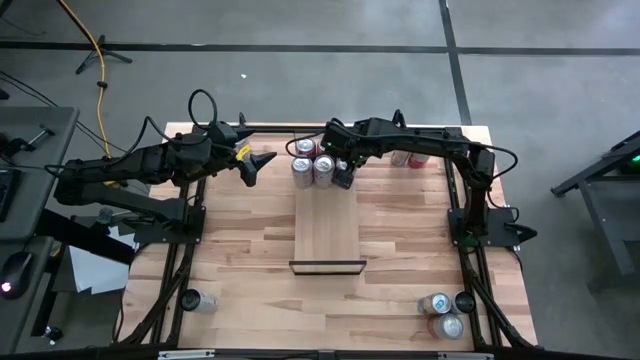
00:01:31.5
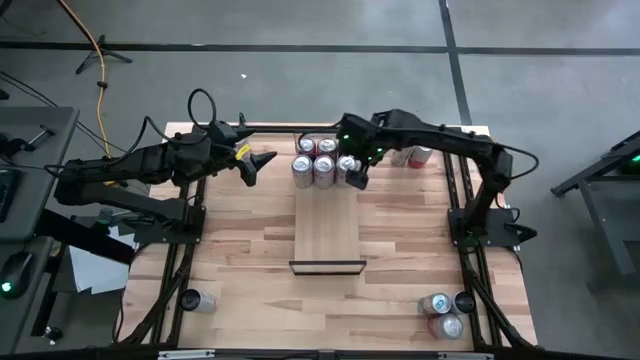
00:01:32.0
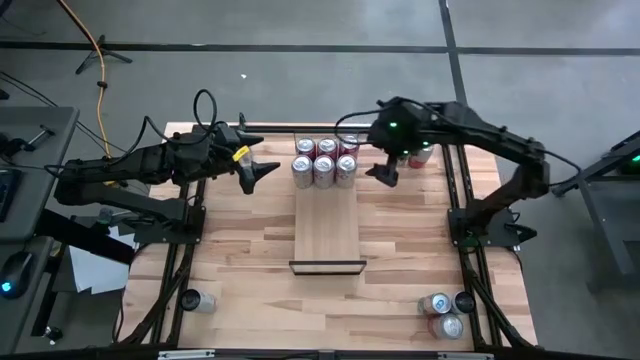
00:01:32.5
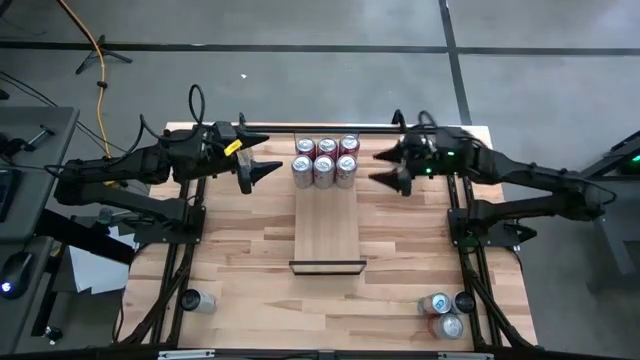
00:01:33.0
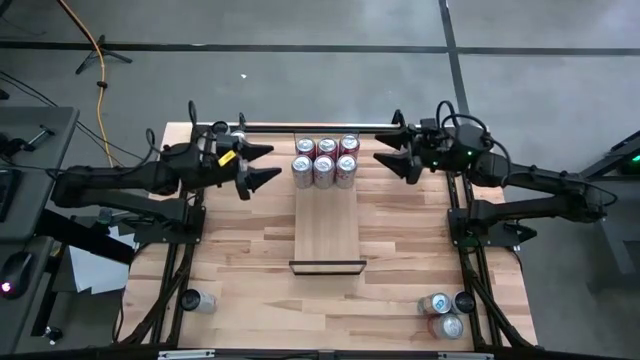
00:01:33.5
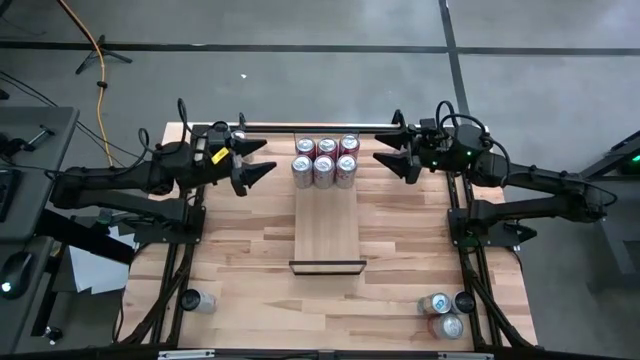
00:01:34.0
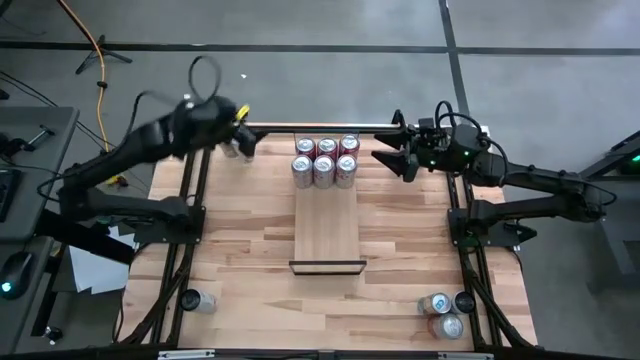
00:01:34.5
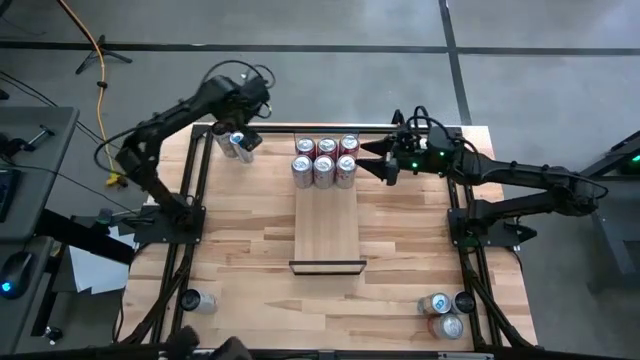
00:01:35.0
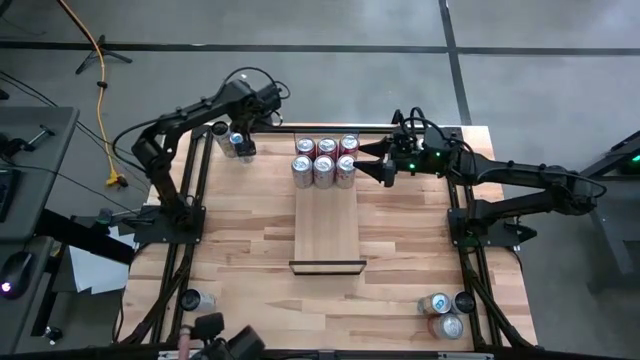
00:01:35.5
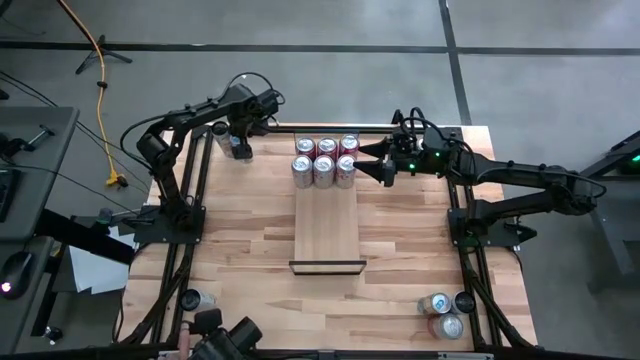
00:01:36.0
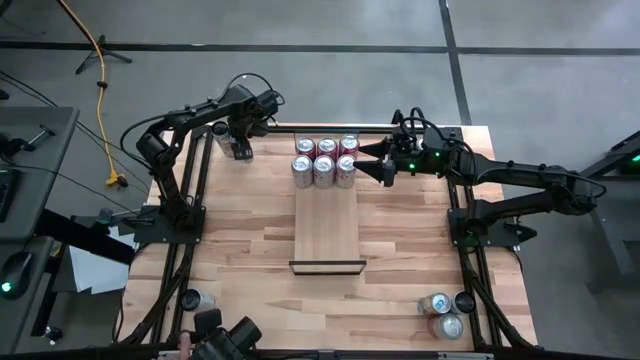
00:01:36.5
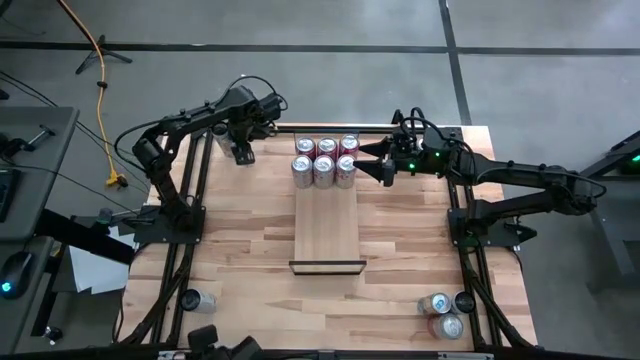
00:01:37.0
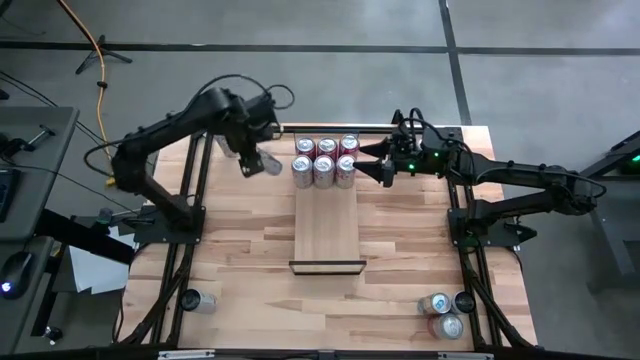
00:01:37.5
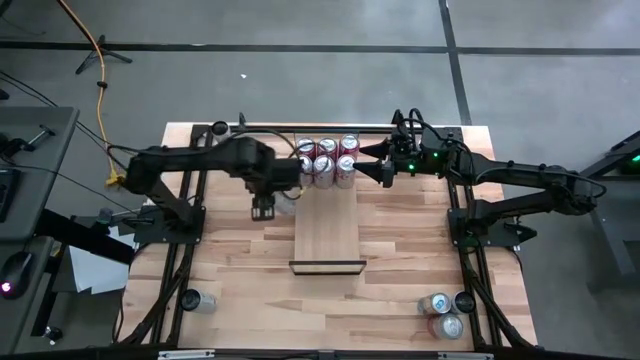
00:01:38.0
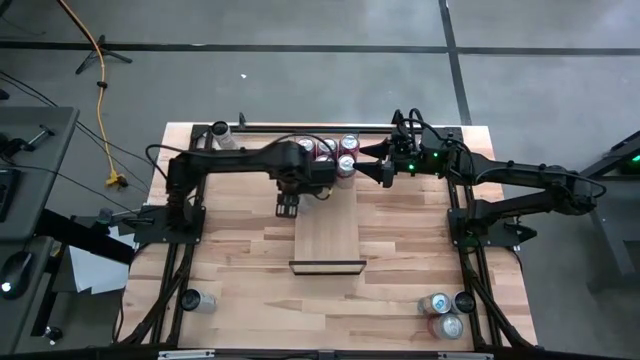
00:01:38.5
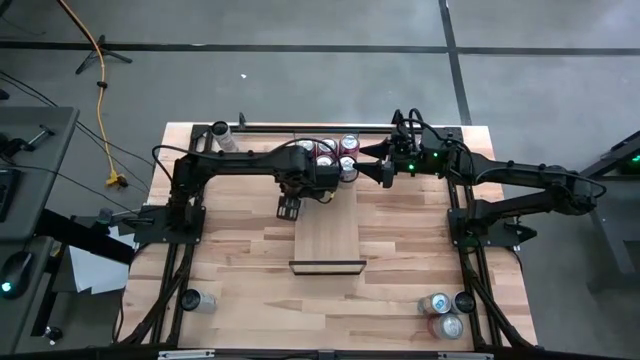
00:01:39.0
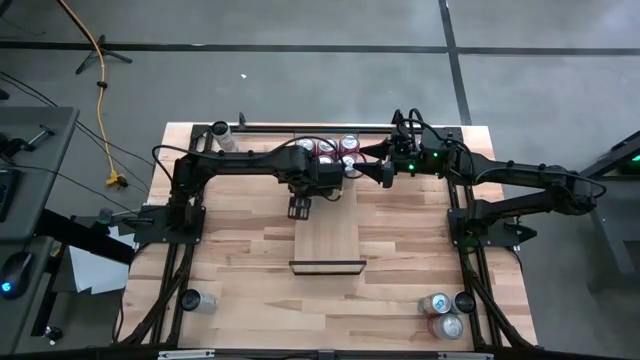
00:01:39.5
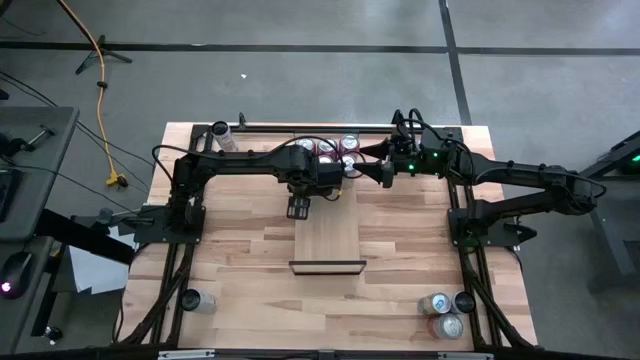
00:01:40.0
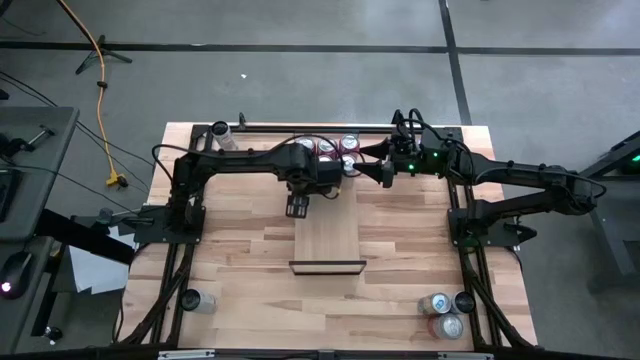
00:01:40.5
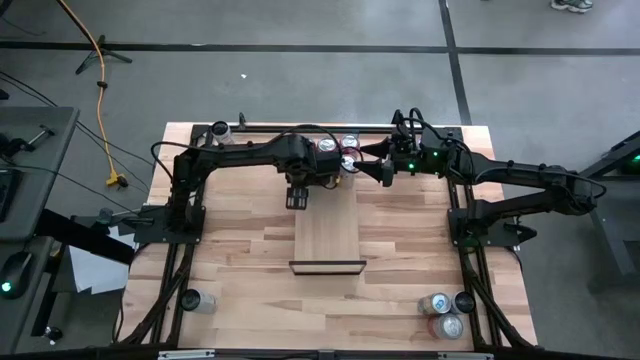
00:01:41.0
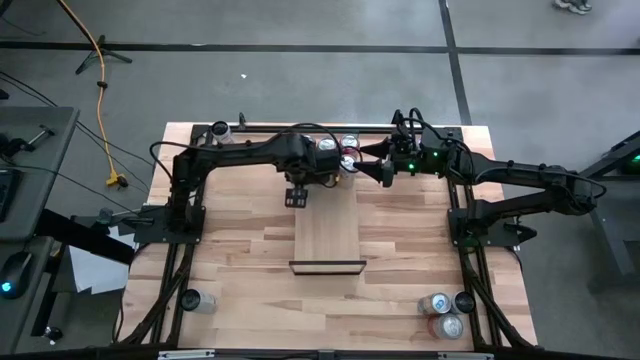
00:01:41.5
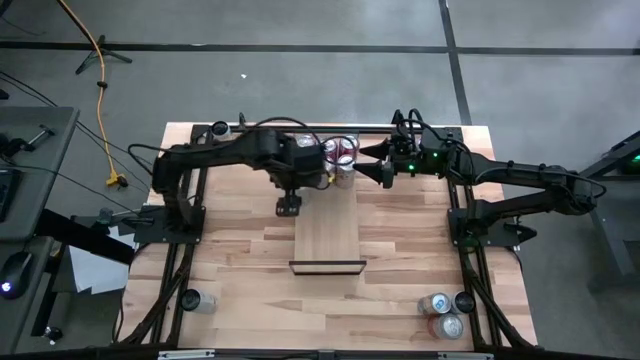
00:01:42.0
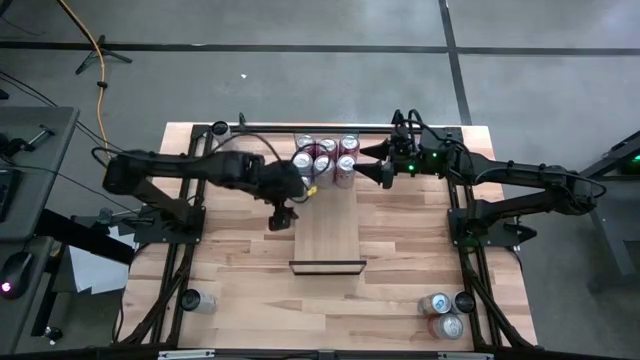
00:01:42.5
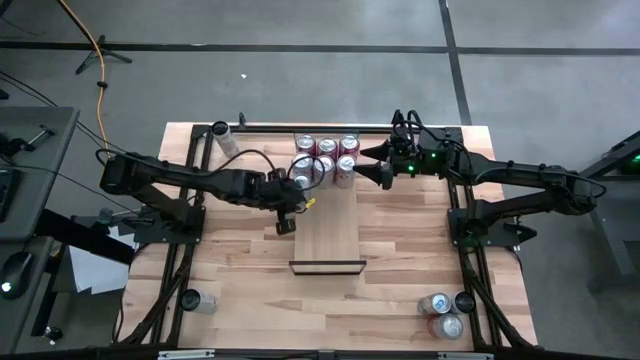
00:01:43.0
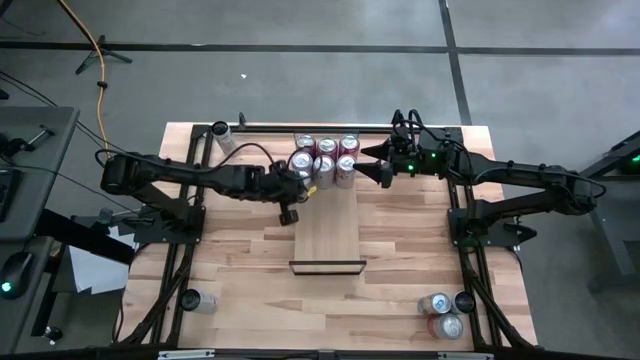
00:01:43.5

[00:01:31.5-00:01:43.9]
Task: Place canned beverage on shelf
Put the top left blue soda can on the shelf

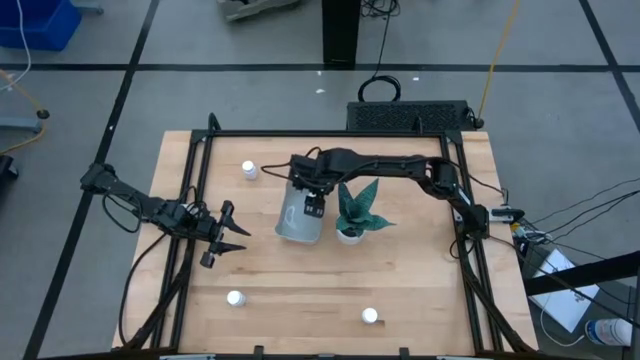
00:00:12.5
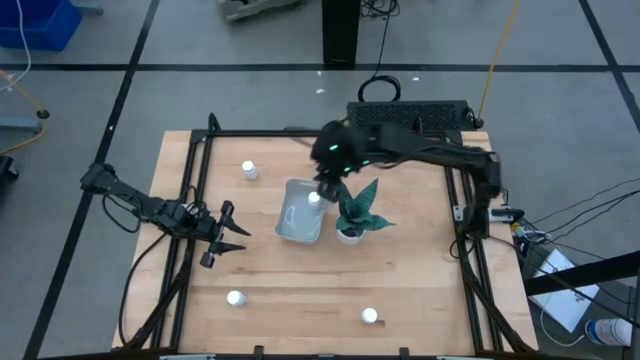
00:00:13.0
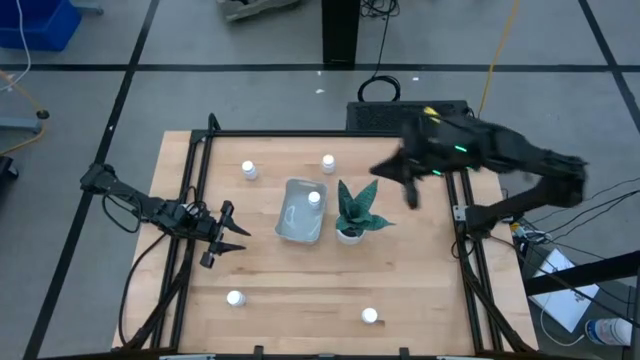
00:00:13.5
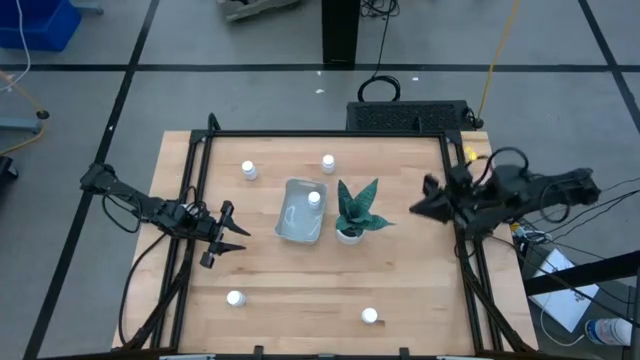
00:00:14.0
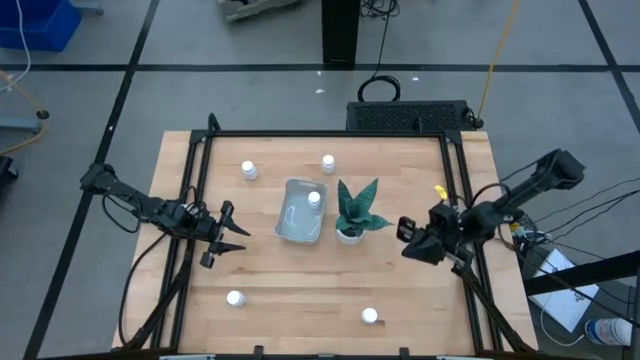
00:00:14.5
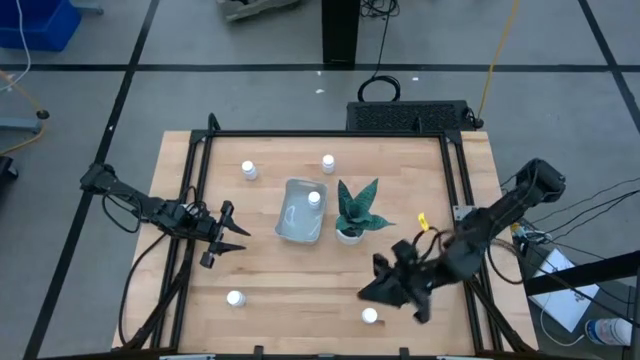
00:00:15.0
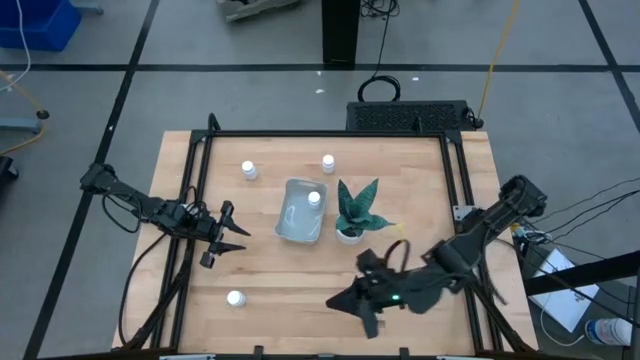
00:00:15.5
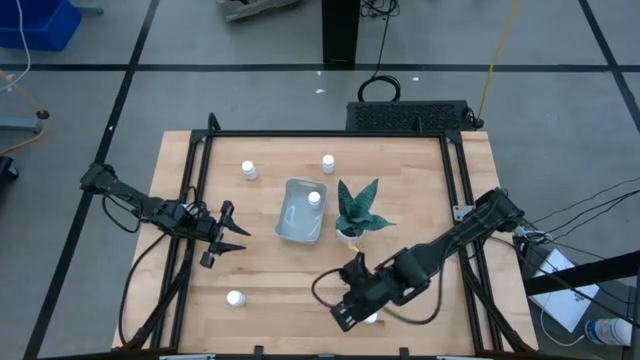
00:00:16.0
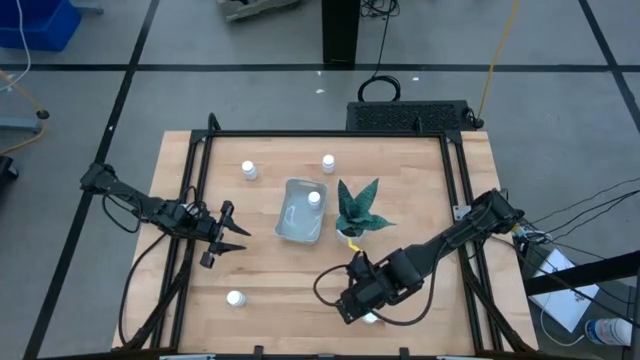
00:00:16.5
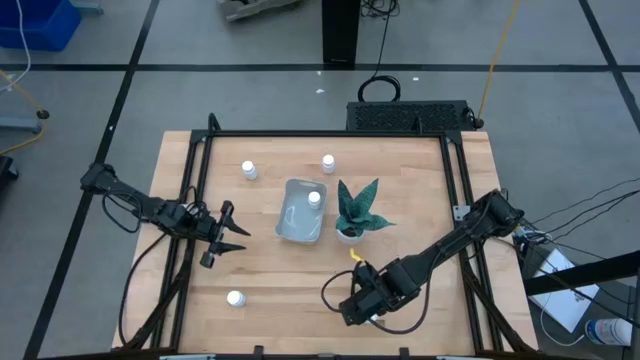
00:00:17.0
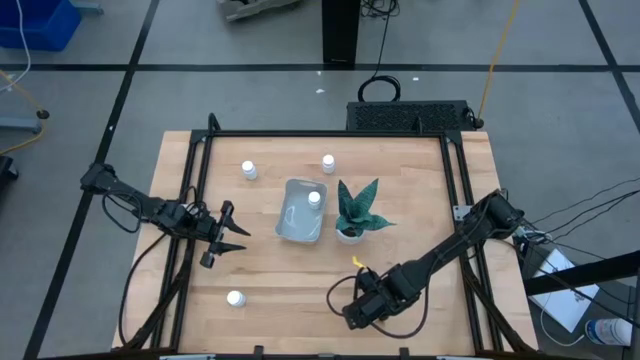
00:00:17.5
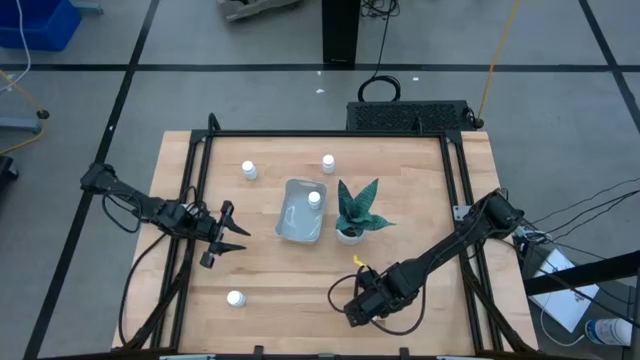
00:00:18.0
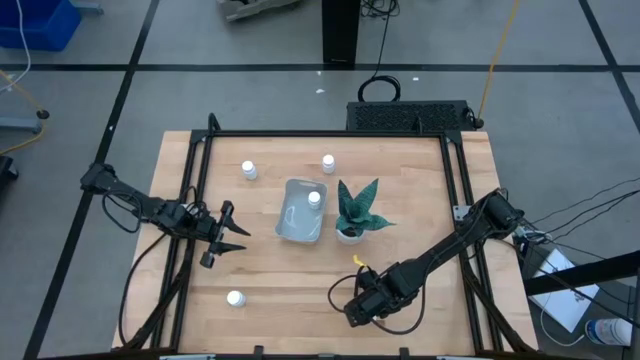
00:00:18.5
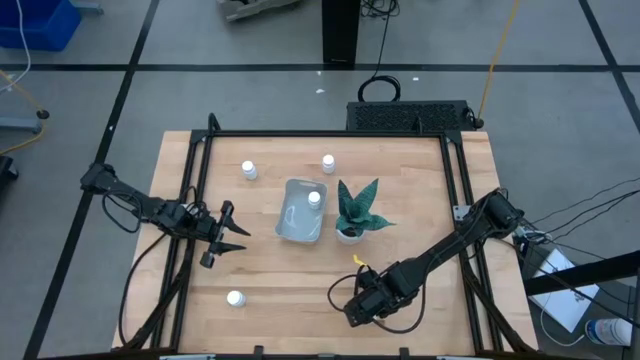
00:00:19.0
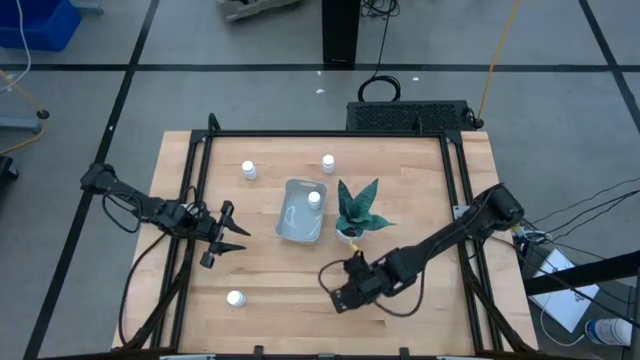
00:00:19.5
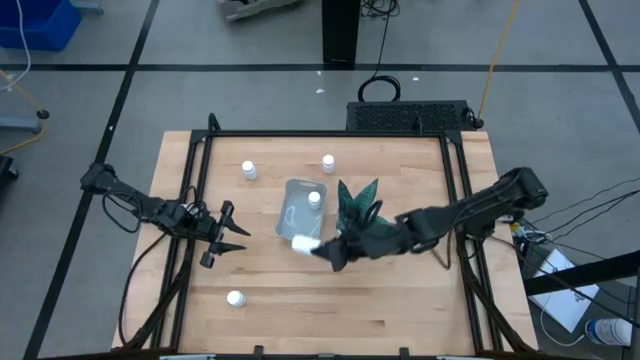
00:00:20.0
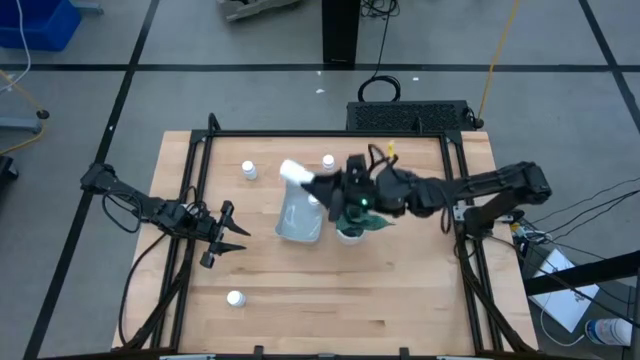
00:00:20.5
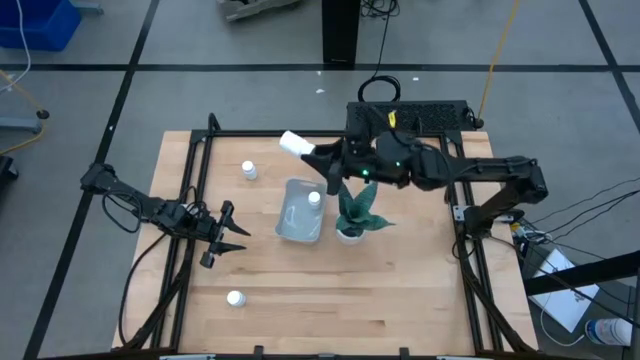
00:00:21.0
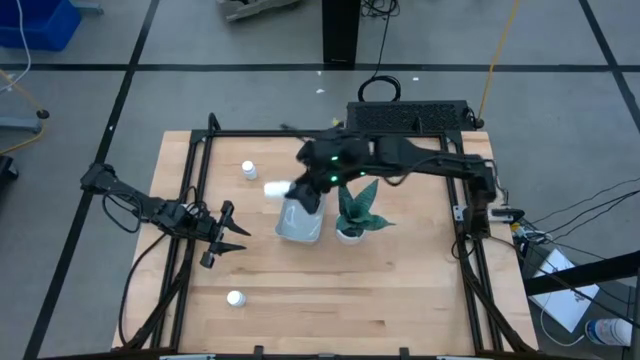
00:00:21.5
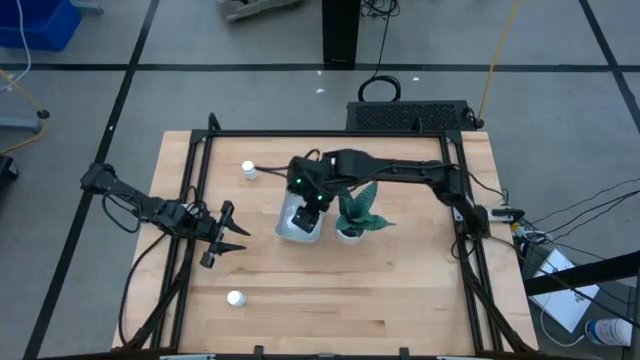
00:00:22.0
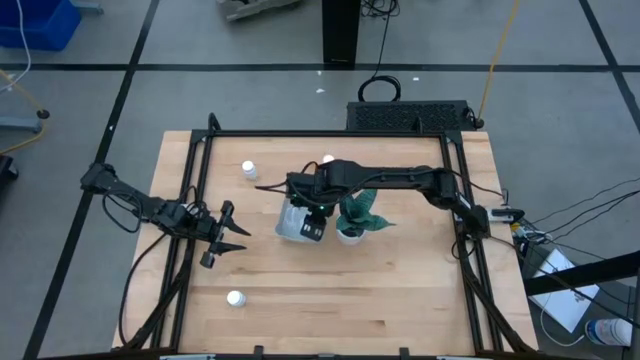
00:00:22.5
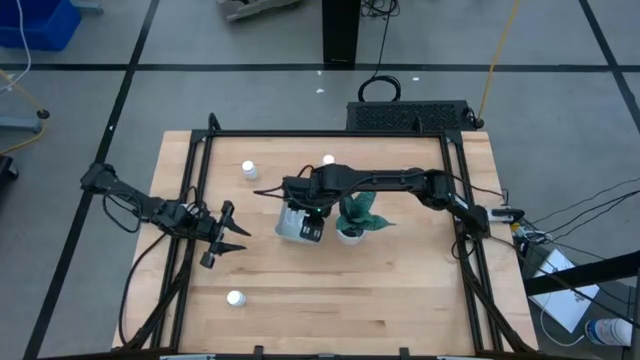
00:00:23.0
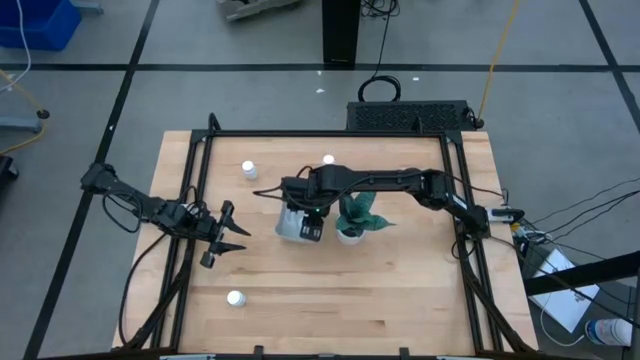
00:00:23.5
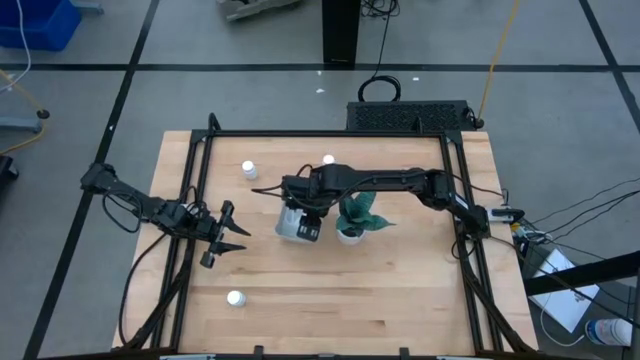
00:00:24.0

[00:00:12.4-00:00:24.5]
Task: Pick and place pill bottles into a basket
Put the white pill bottle into the gray bin
